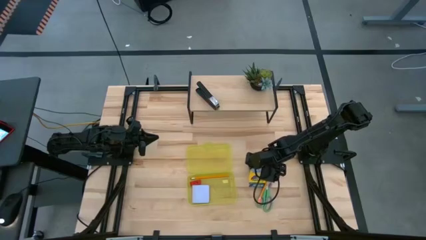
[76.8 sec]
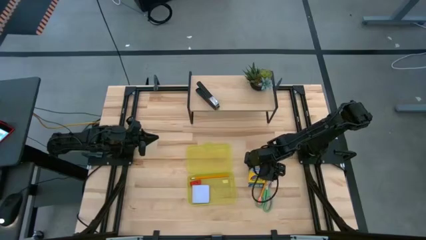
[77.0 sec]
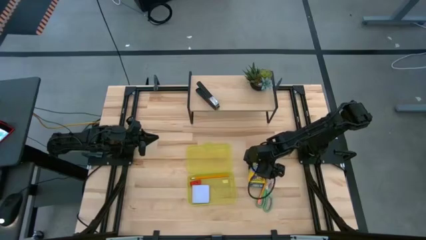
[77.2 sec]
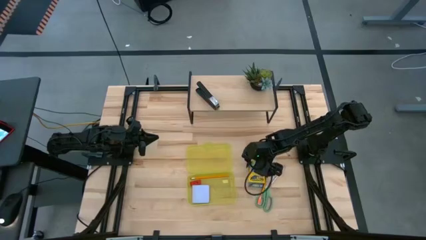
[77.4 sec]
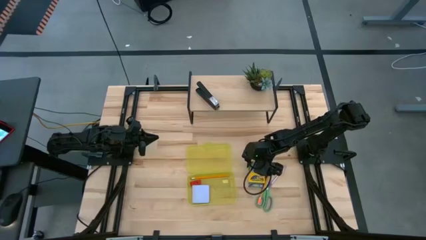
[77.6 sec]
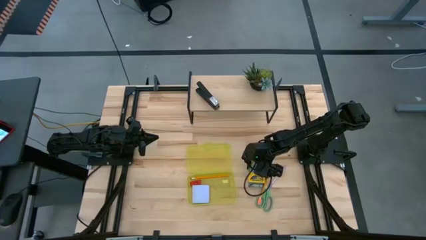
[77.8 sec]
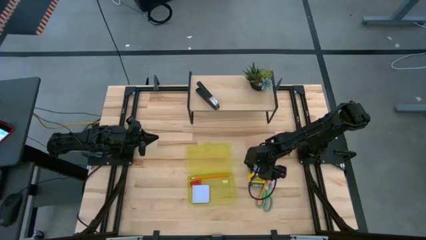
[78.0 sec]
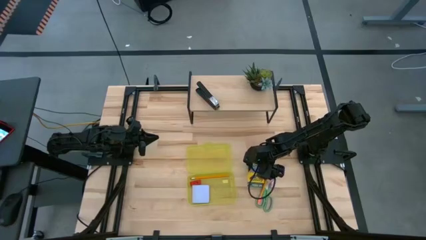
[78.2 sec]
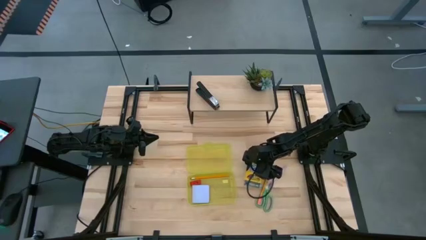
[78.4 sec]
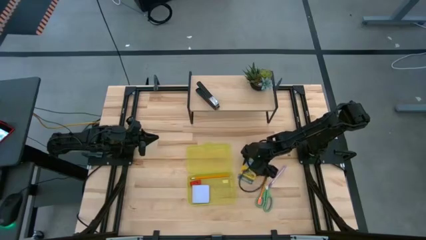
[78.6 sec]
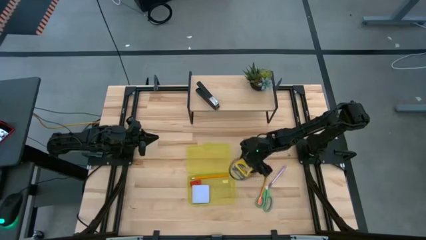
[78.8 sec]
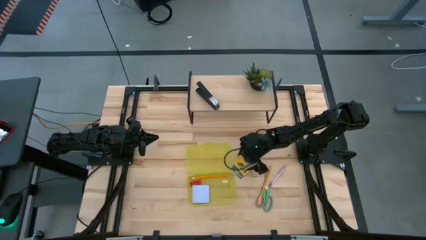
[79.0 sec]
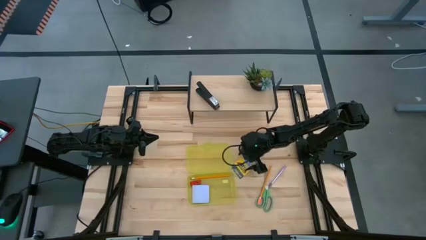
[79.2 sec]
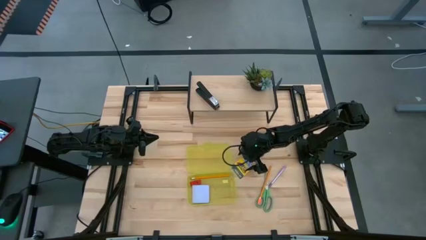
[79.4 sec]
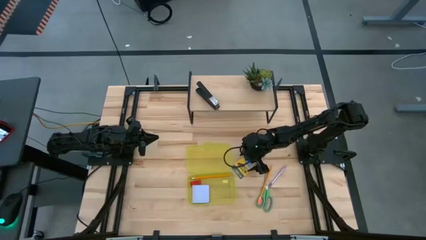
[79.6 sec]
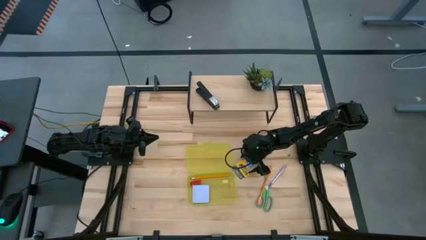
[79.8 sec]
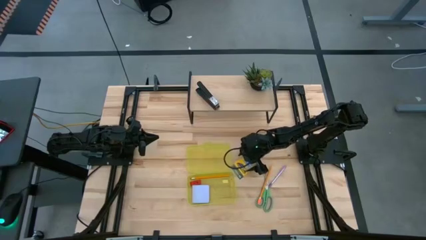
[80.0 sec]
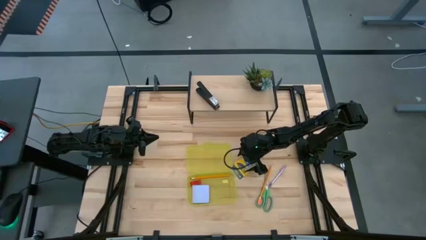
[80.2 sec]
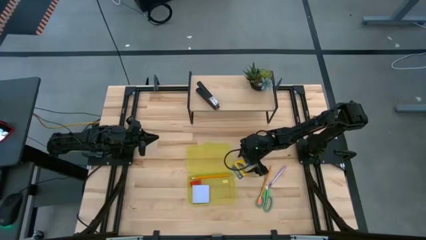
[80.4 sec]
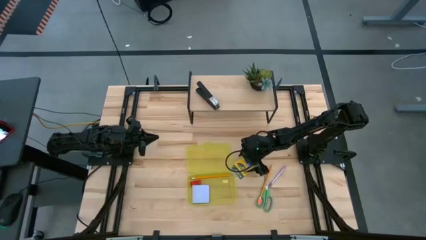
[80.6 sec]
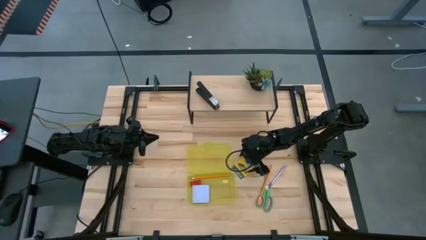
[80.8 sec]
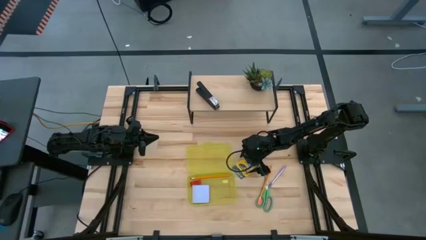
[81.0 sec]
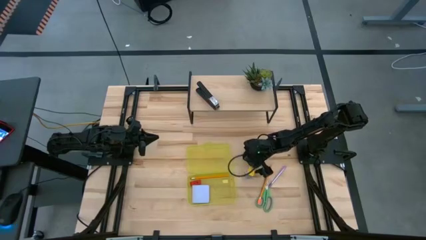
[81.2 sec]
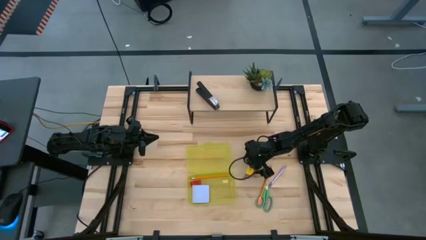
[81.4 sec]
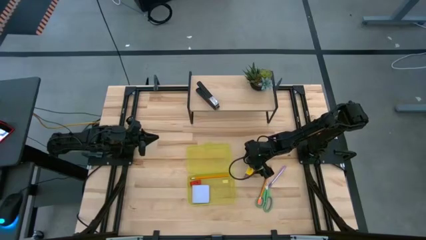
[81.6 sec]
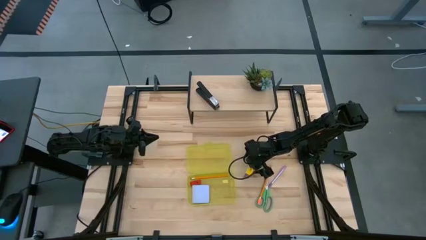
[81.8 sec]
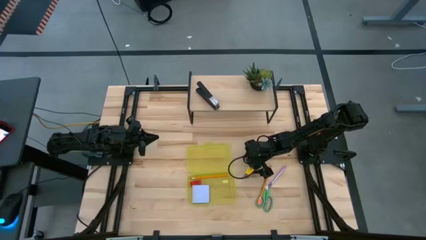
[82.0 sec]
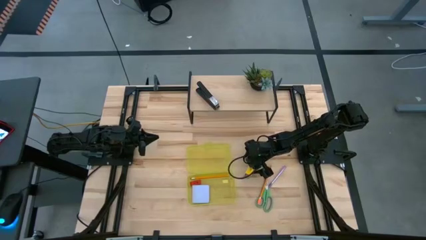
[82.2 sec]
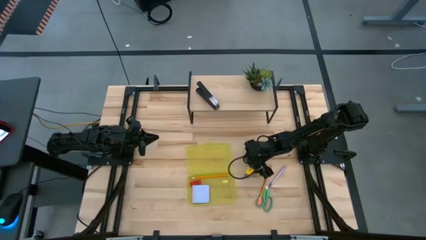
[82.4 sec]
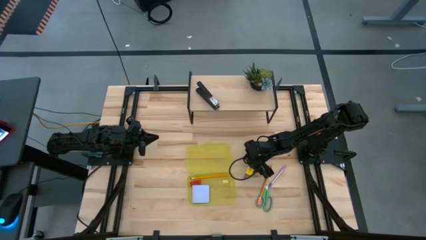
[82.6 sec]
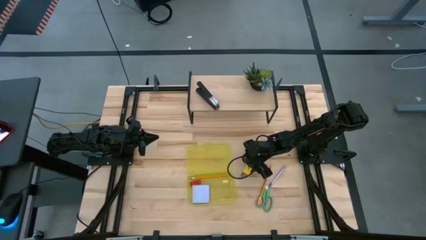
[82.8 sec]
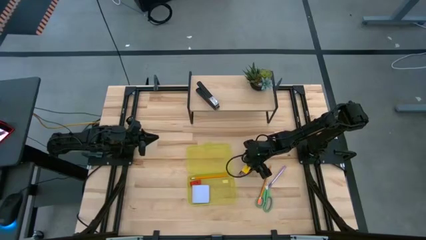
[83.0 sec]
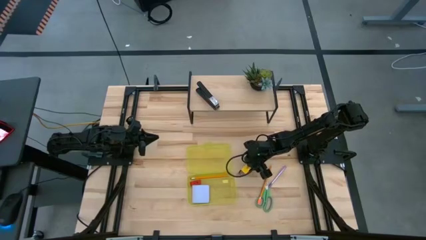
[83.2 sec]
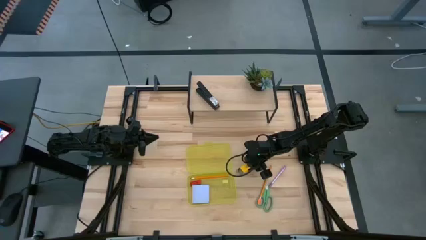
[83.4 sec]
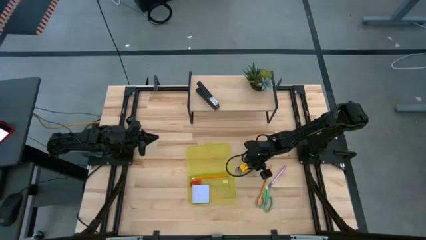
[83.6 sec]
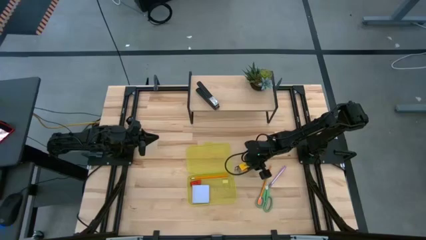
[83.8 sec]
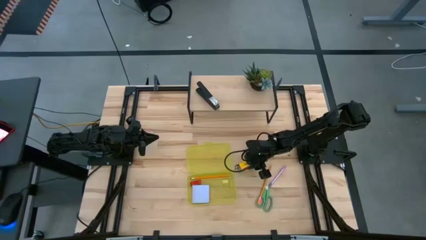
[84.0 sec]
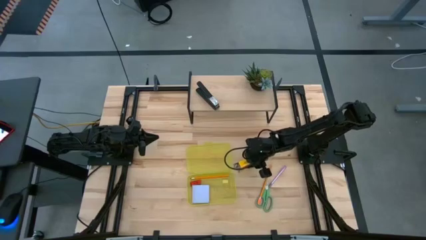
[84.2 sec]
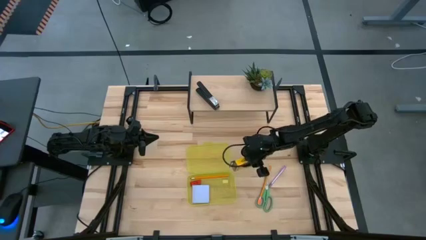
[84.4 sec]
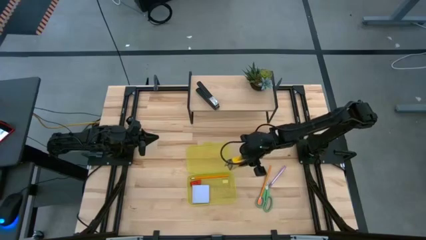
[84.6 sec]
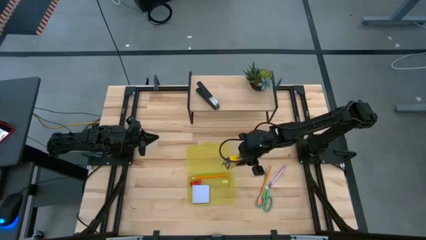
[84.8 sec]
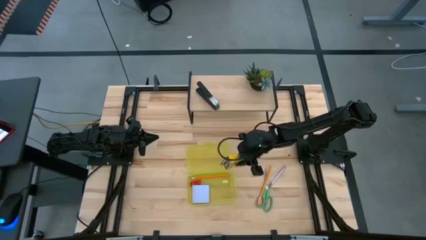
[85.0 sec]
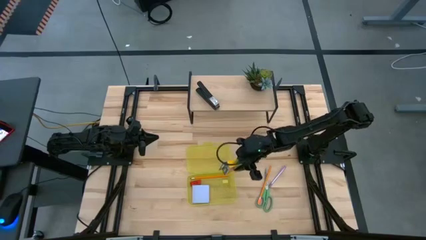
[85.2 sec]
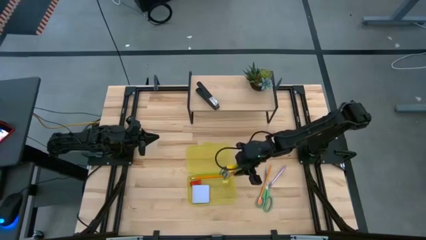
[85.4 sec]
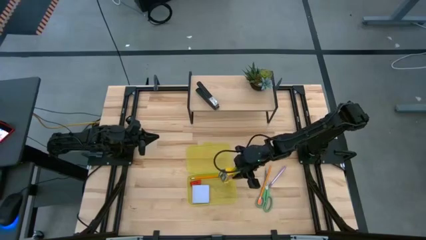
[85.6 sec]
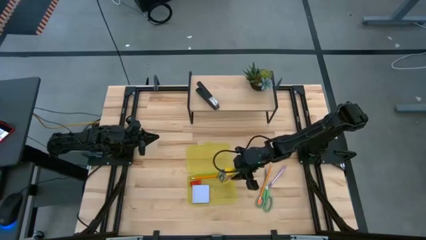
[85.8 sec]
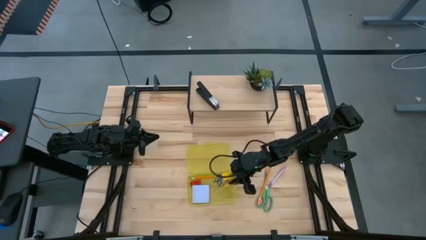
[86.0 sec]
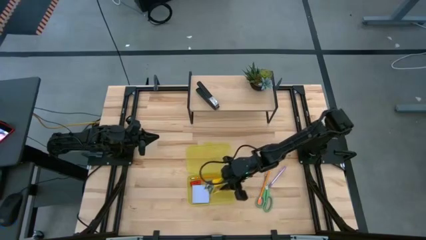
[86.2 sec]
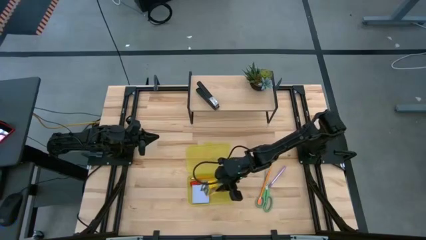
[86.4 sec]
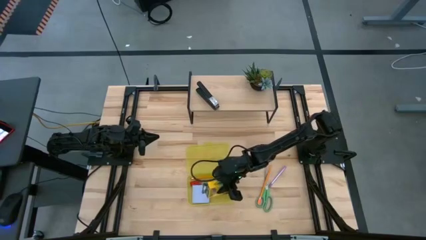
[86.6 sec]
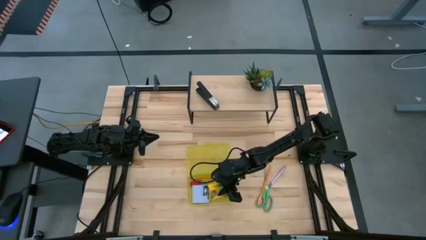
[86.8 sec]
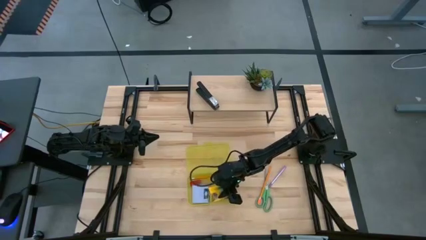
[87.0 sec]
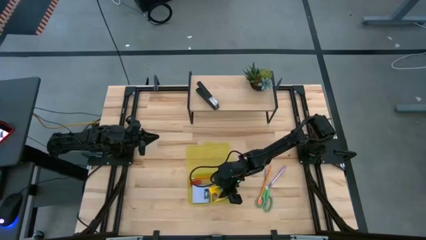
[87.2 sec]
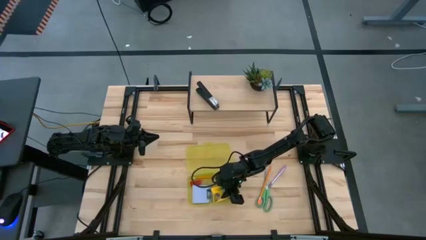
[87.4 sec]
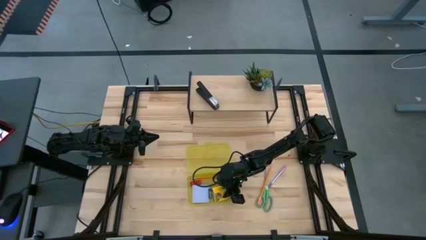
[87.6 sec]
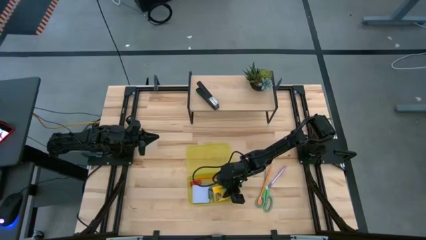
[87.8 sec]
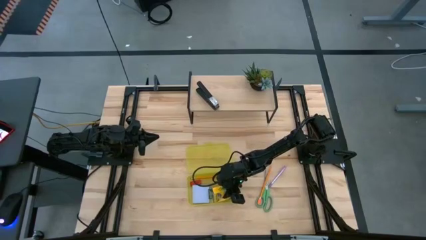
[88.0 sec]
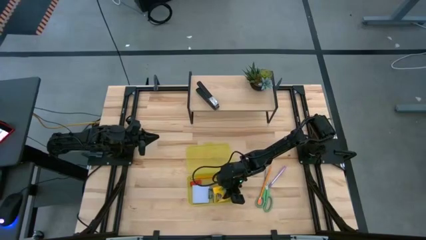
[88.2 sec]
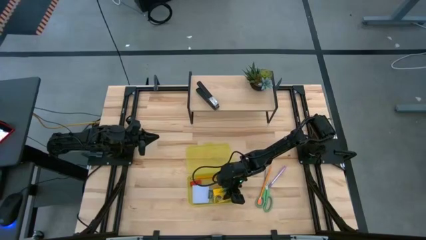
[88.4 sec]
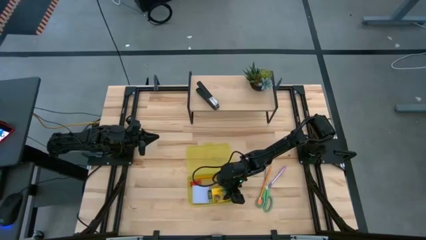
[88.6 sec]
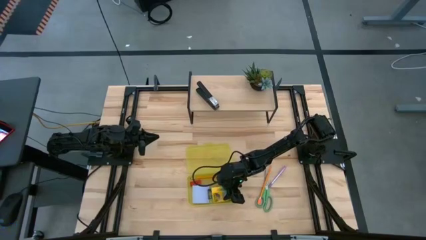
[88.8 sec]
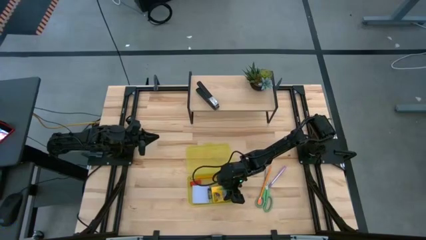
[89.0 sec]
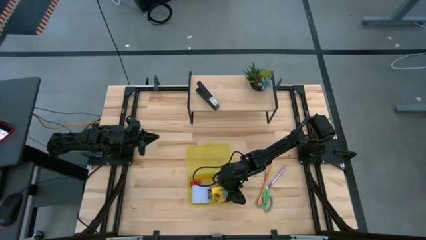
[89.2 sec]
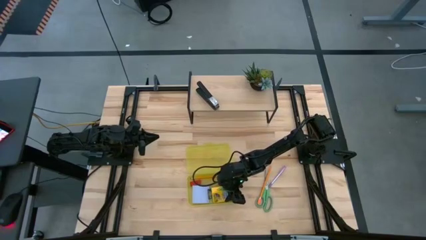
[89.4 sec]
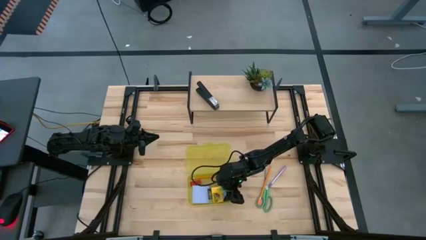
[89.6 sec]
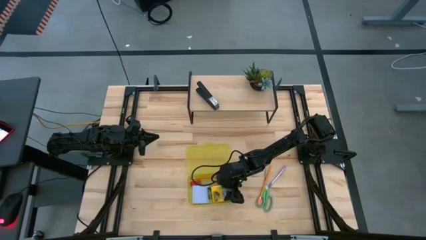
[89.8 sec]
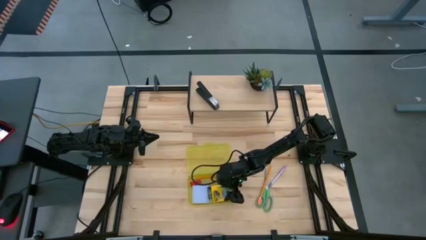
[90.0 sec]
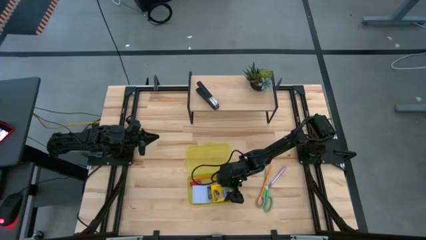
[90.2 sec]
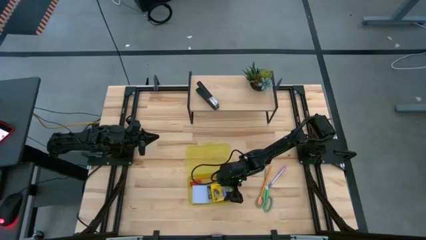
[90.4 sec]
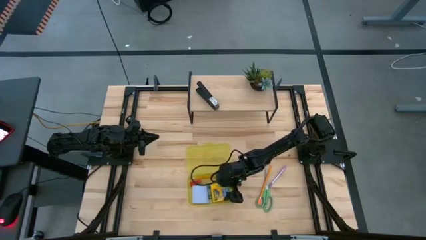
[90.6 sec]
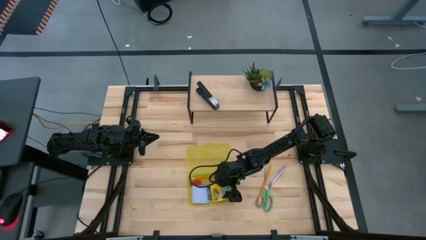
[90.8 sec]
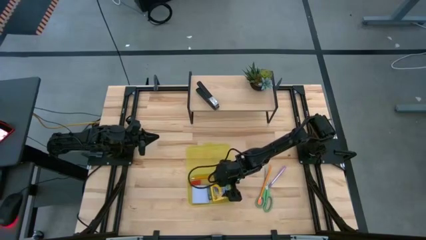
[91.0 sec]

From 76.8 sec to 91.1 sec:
Task: Pack school essentials
Put the yellow crayon box into the yellow supply box
